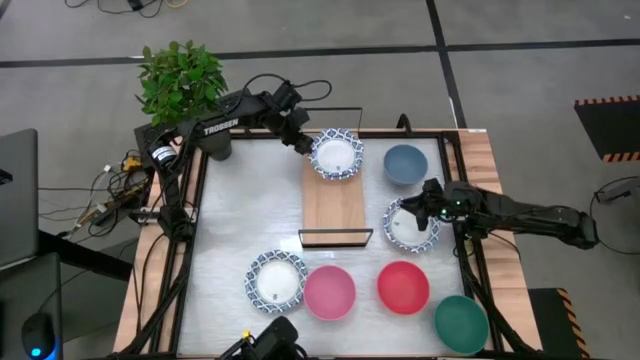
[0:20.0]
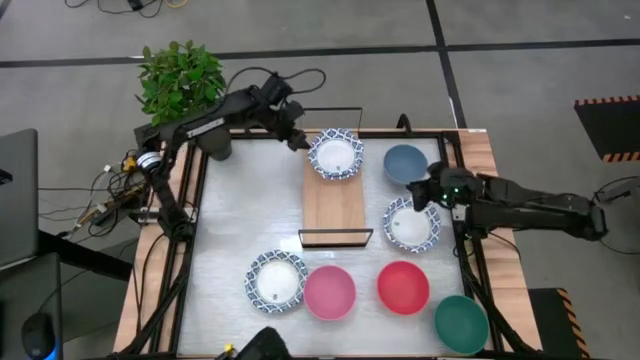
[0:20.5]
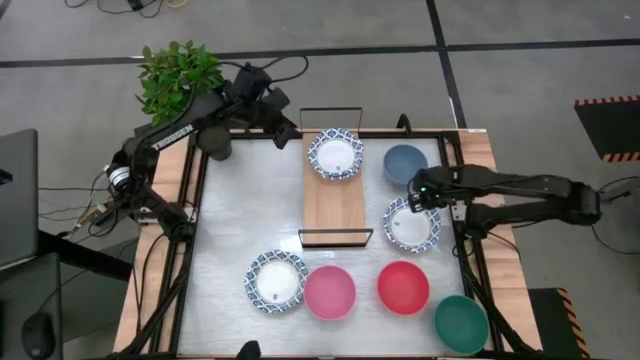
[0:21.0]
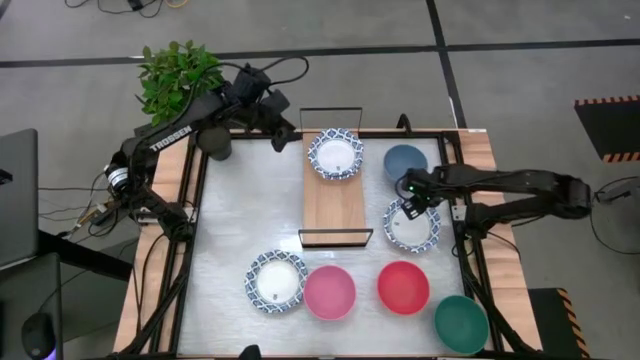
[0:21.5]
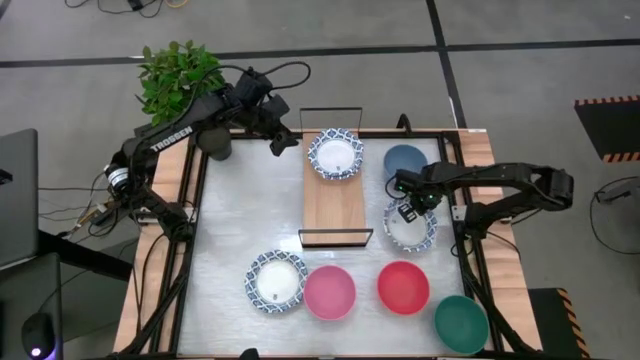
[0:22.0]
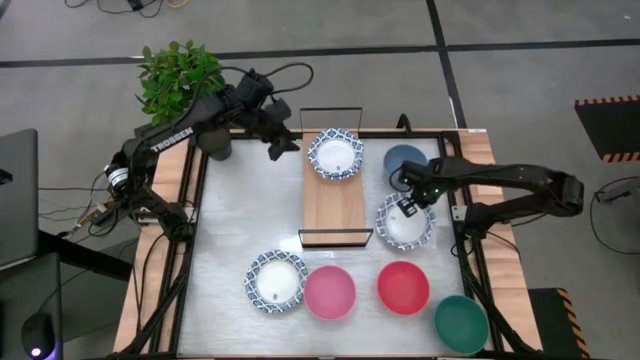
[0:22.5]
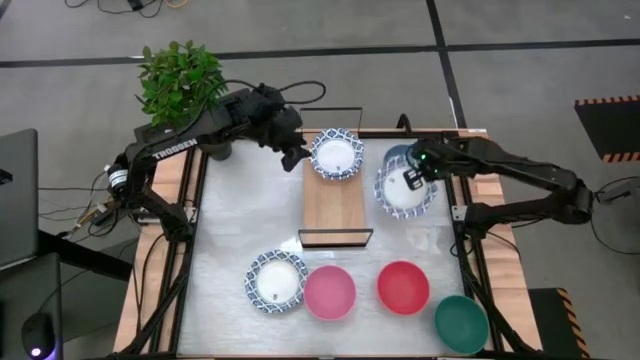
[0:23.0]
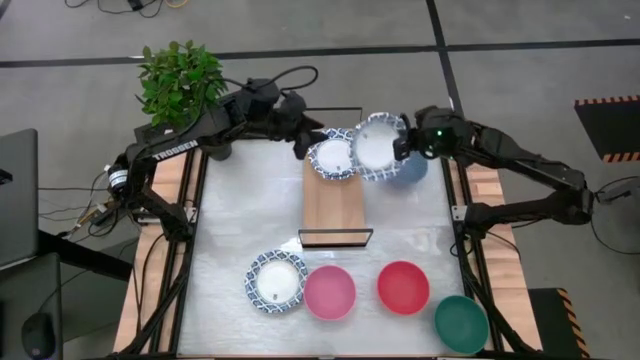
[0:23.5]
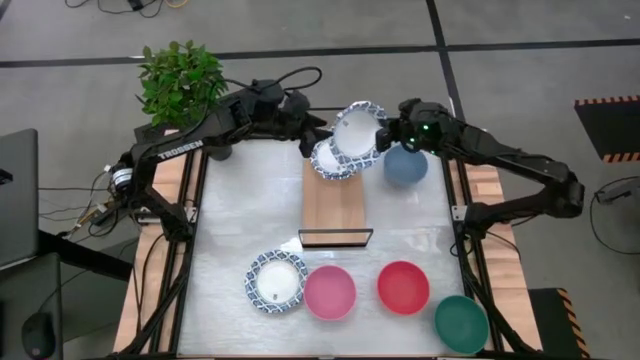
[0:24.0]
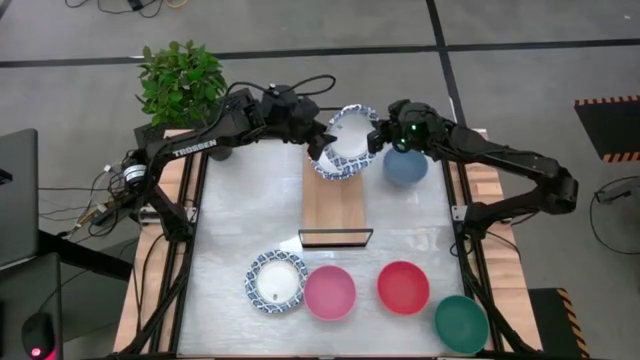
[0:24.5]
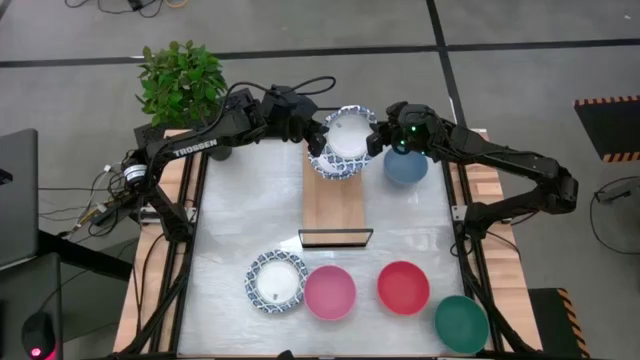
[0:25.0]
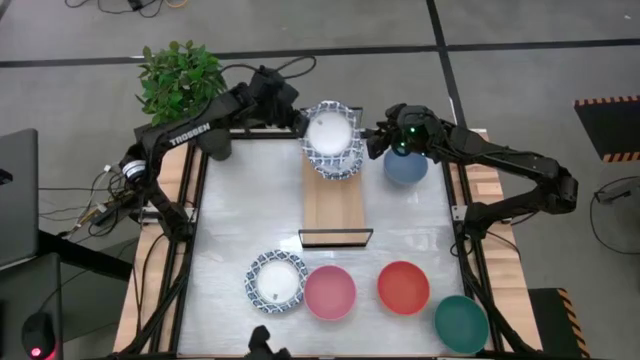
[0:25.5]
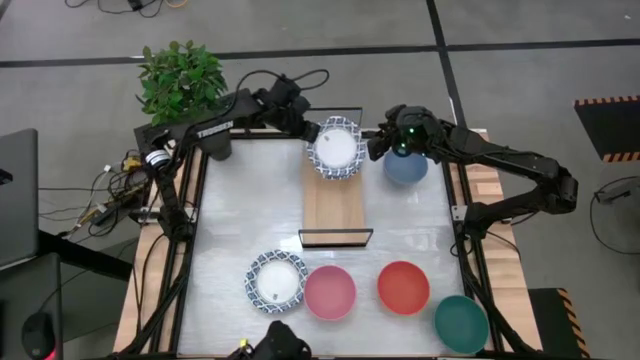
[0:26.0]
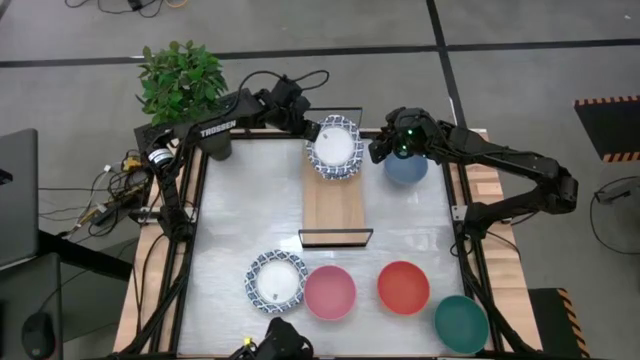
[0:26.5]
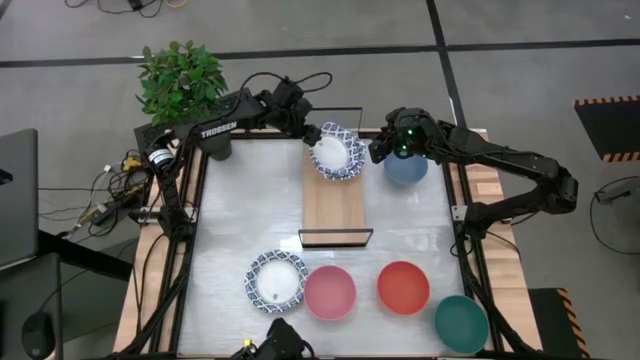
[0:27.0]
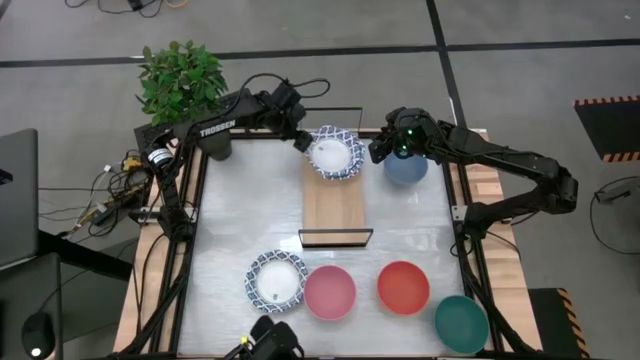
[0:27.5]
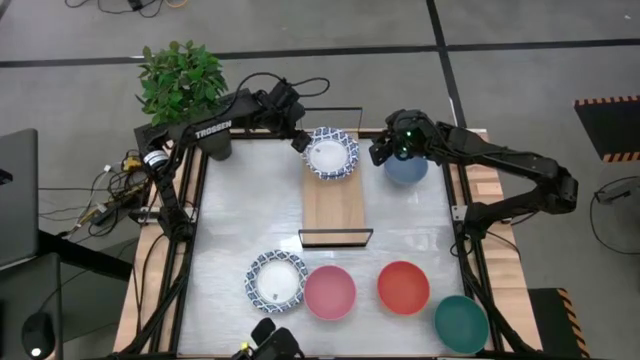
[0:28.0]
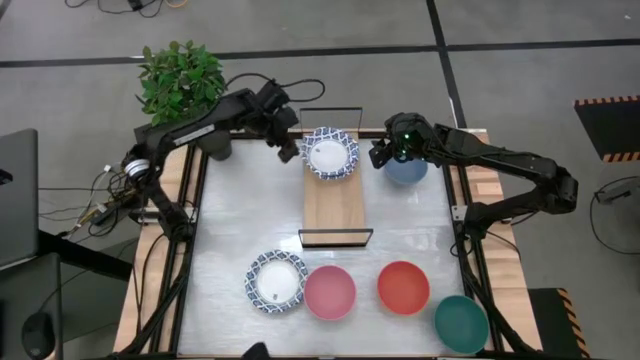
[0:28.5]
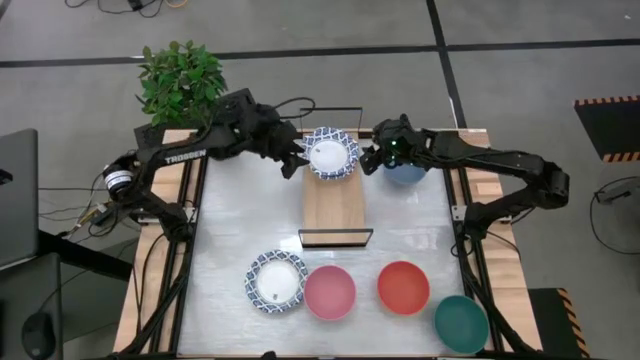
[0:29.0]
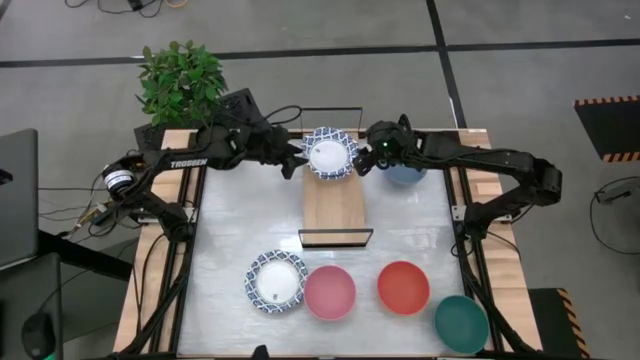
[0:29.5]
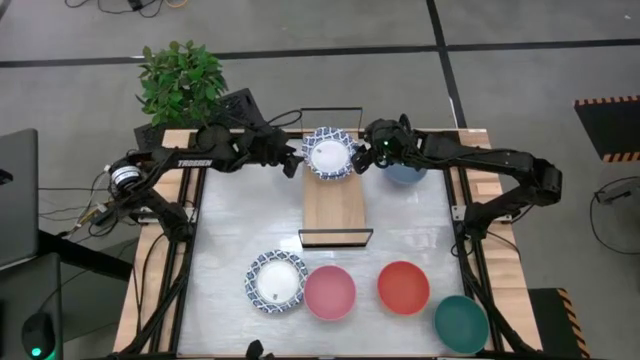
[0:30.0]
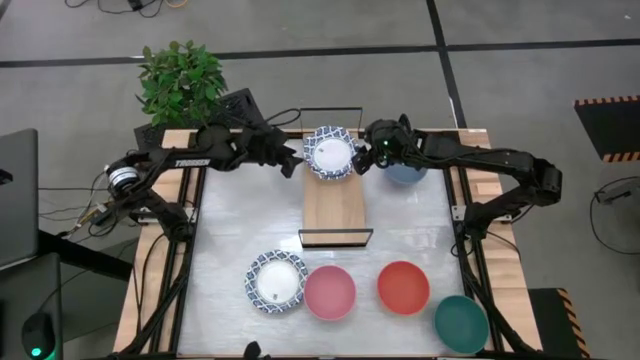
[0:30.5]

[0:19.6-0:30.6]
Task: Place and stack bowls onto a shelf
Stack the blue patterned bowl on top of the blue patterned bowl on the shelf

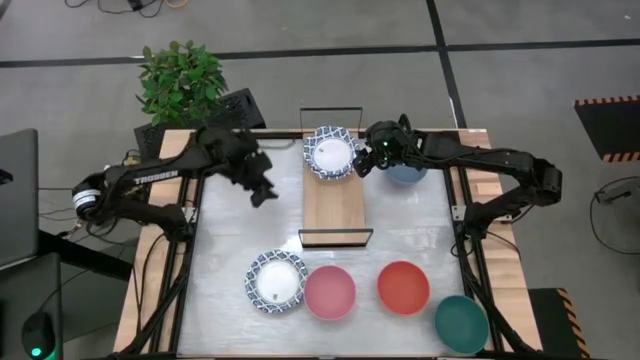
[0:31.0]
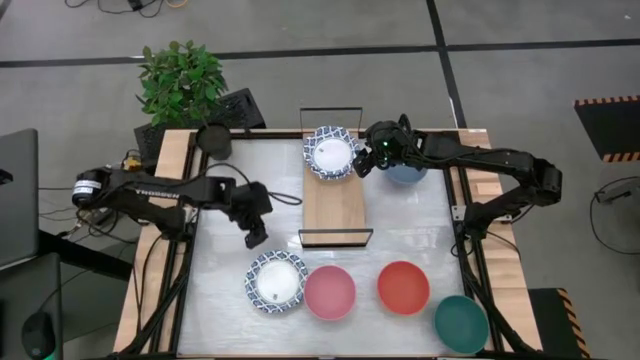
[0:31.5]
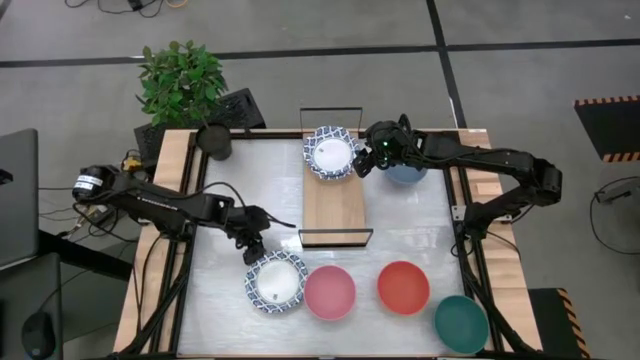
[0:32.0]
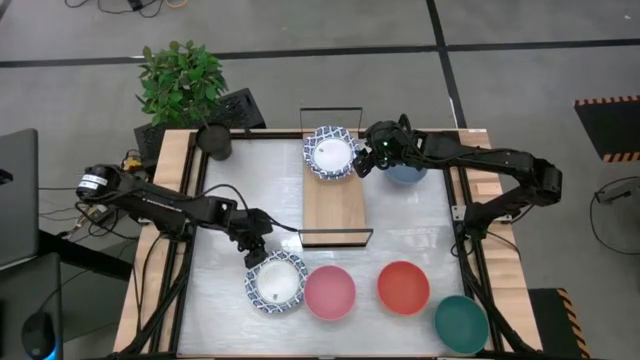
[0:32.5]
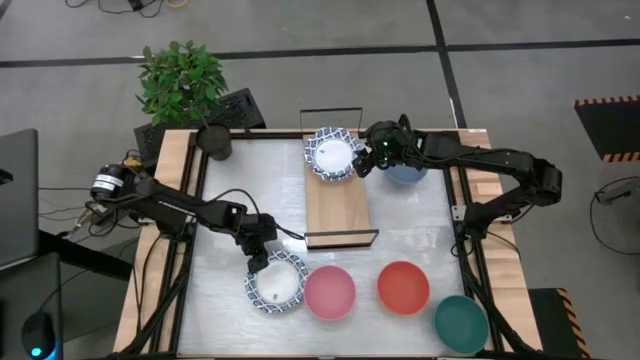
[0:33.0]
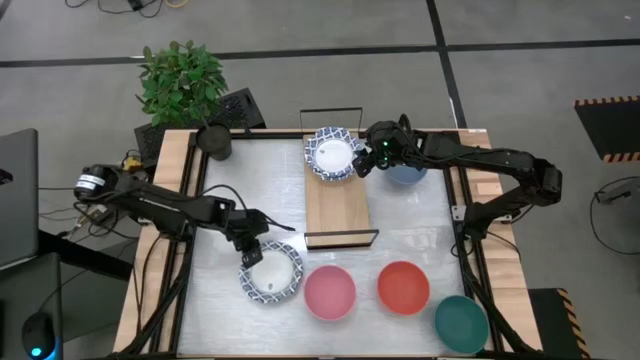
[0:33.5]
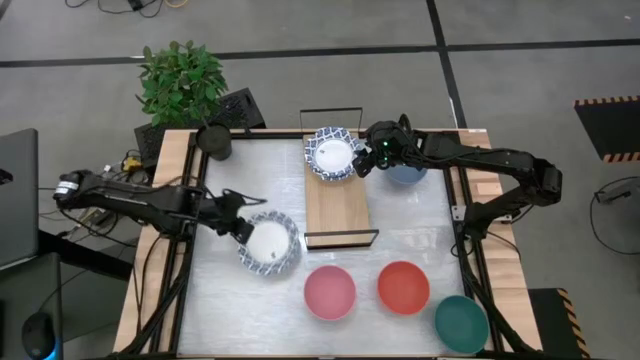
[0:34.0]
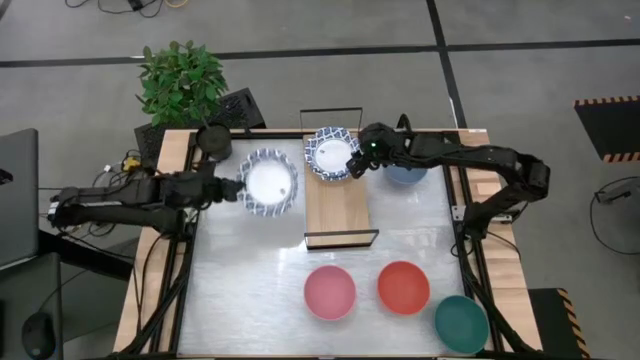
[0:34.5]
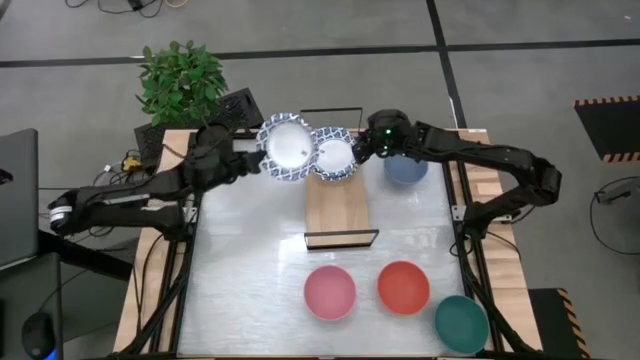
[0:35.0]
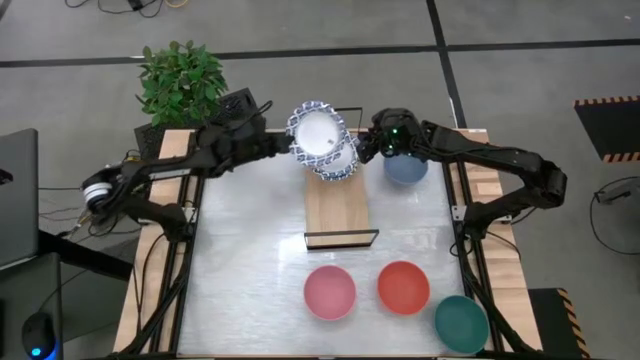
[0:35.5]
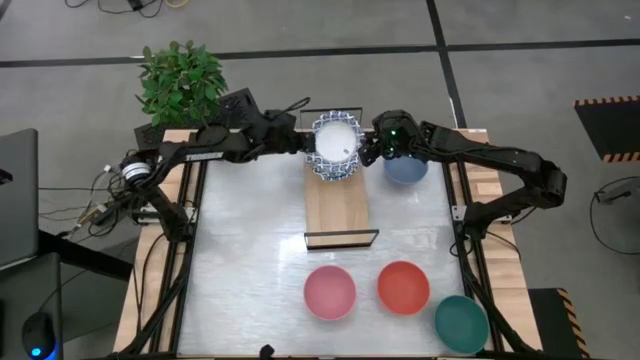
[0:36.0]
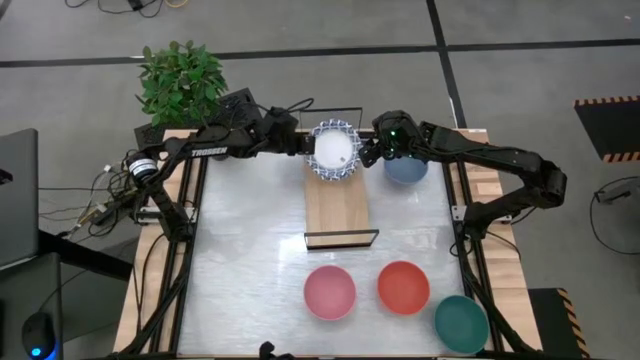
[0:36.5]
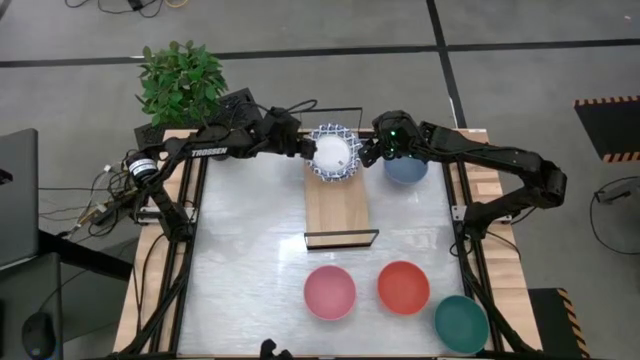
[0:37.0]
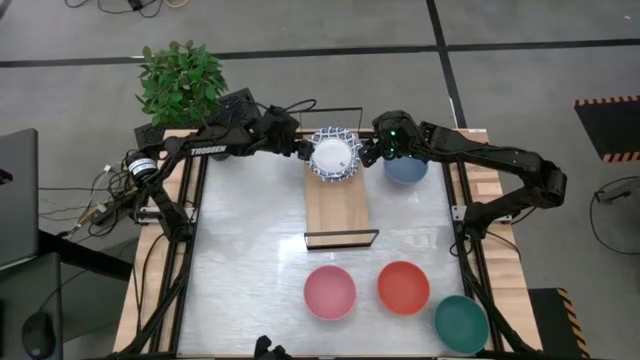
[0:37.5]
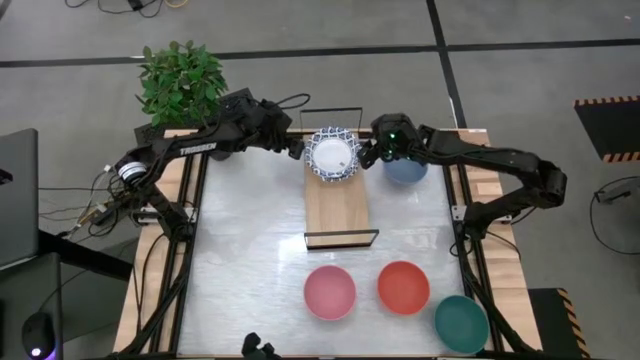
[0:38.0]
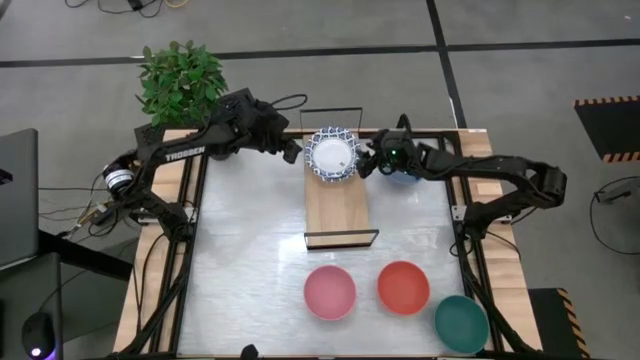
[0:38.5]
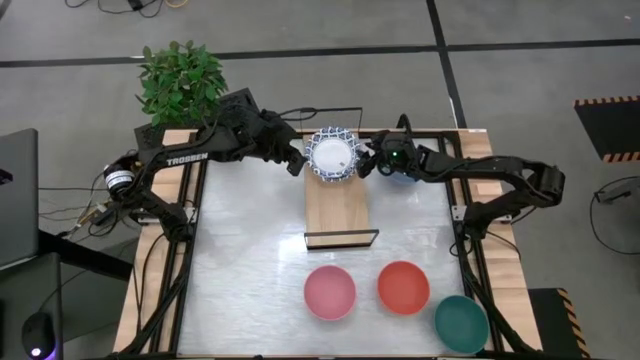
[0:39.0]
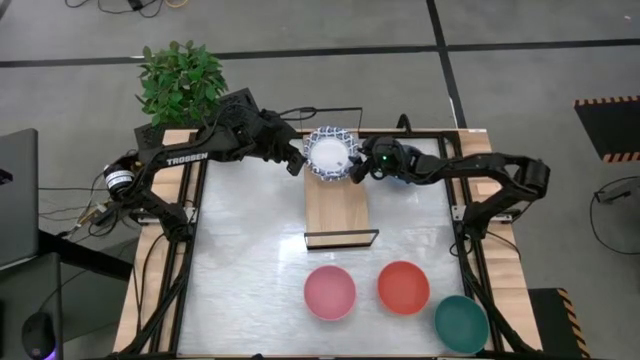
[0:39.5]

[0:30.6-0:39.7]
Stack the blue patterned bowl on top of the blue patterned bowl on the shelf
